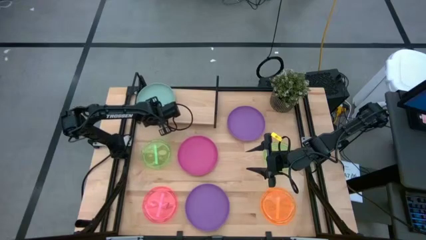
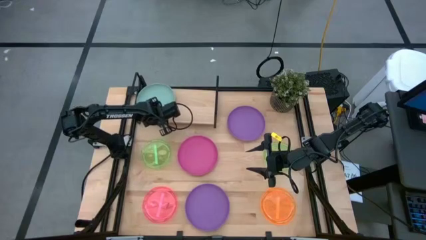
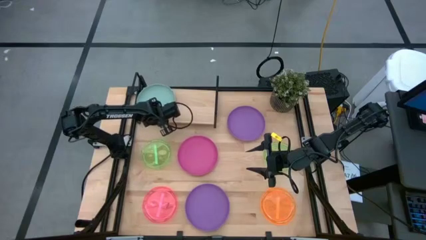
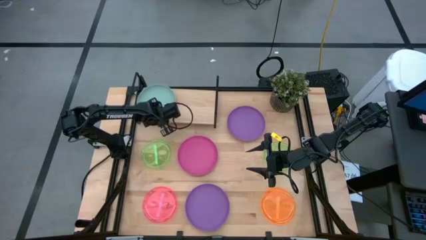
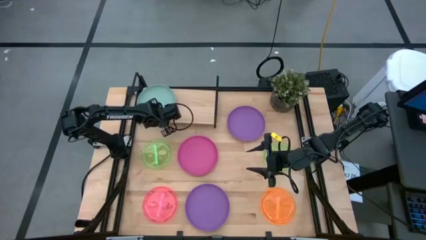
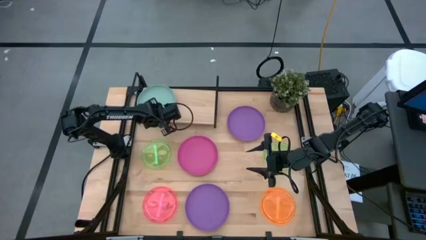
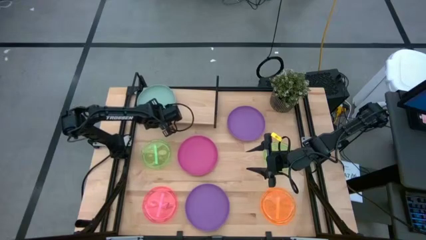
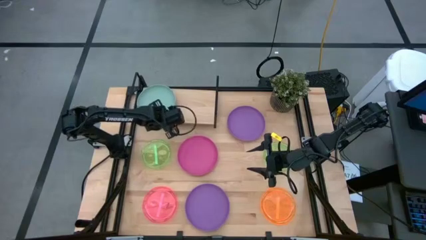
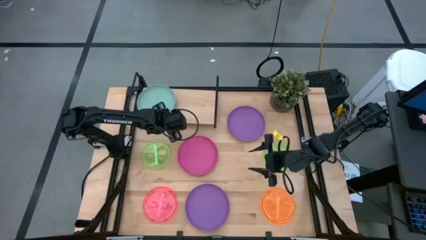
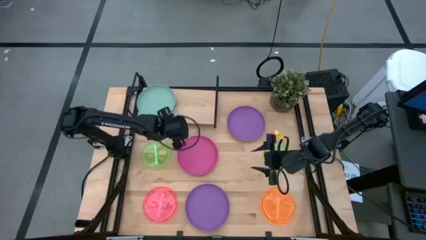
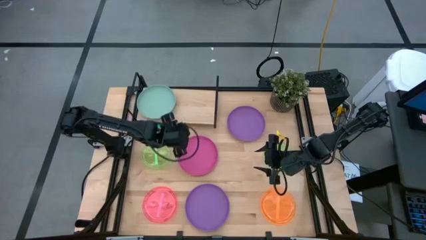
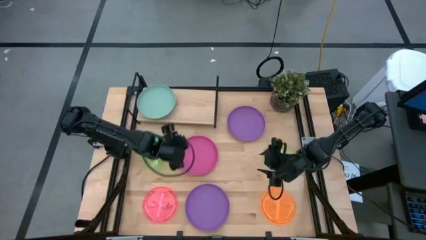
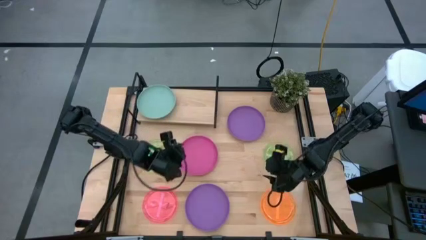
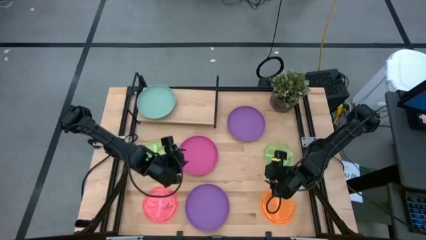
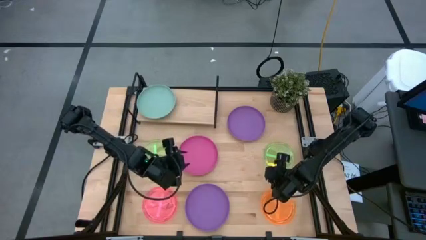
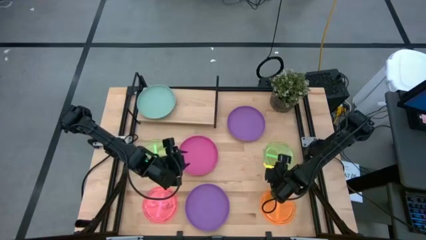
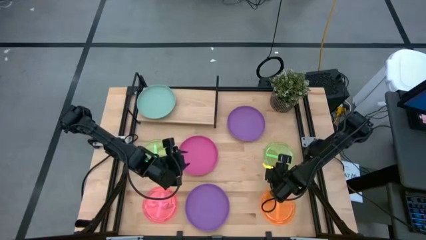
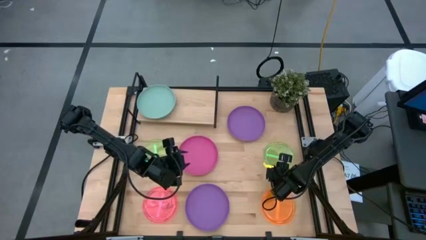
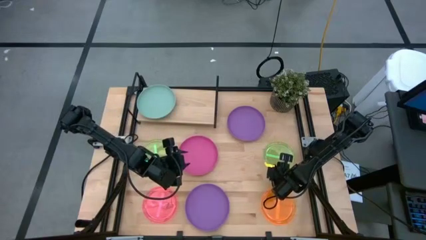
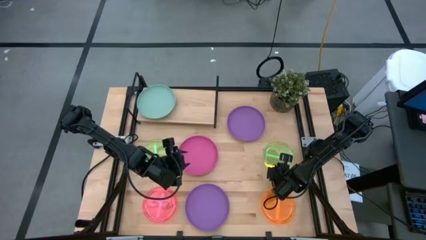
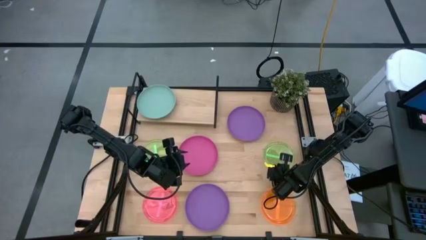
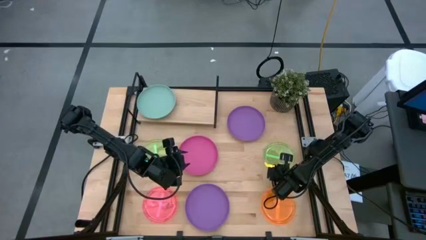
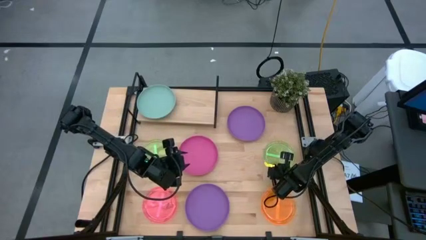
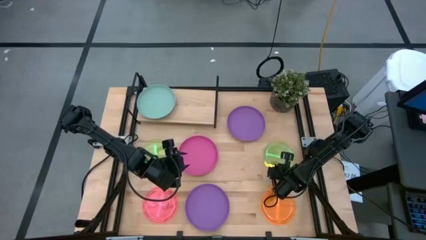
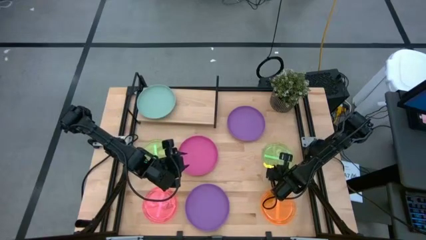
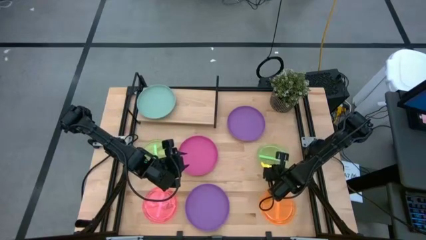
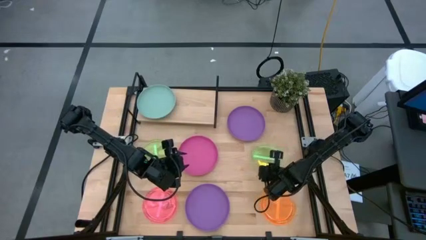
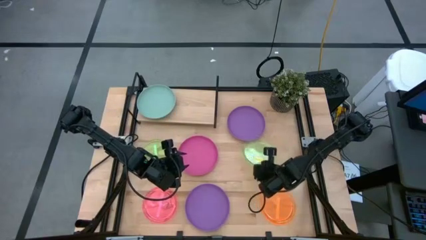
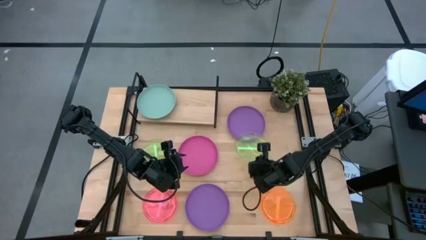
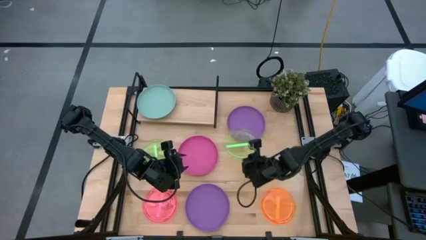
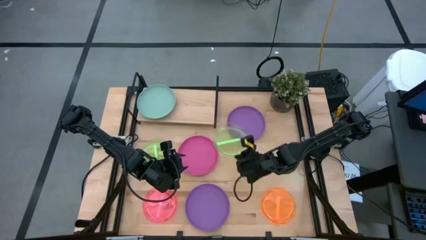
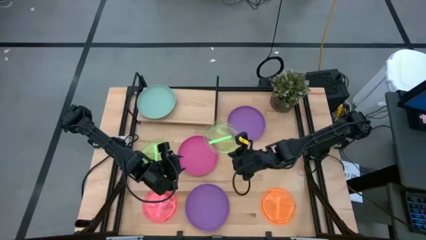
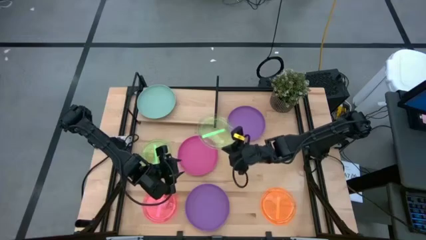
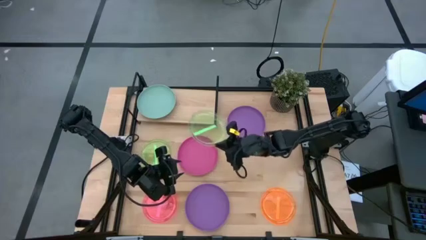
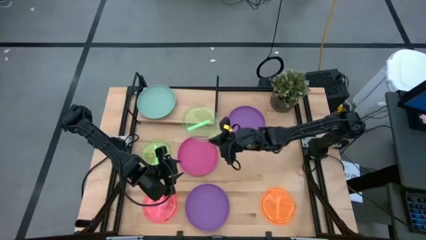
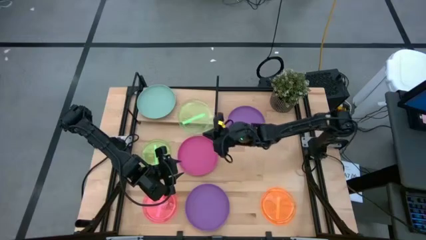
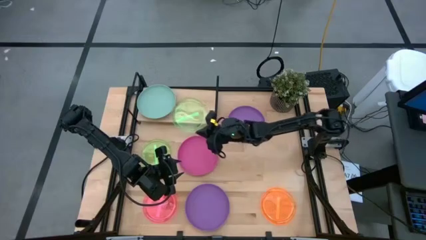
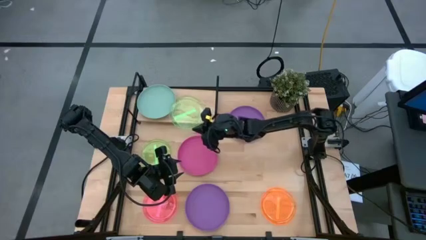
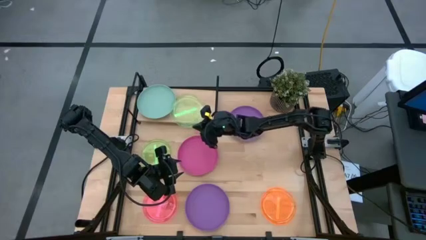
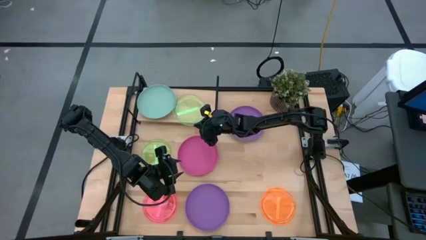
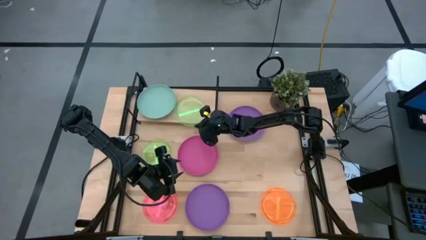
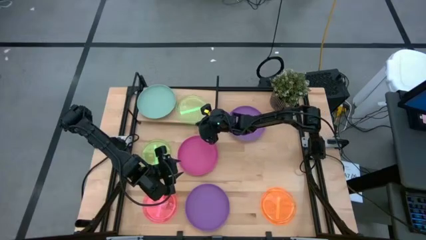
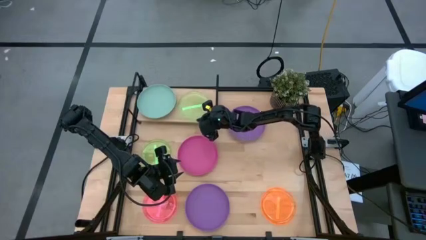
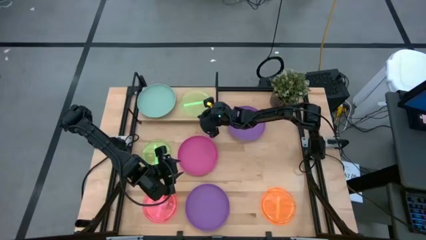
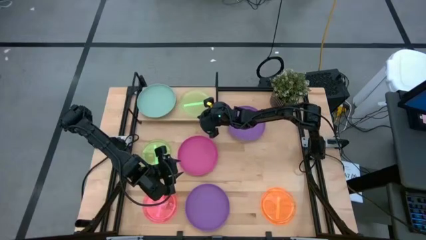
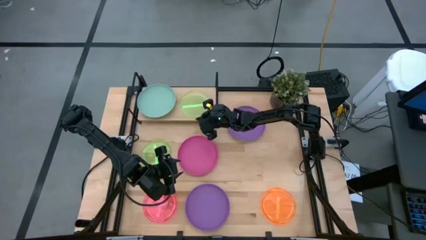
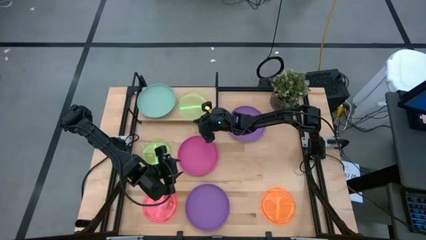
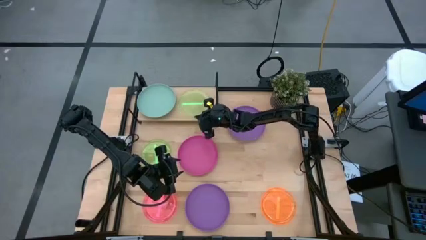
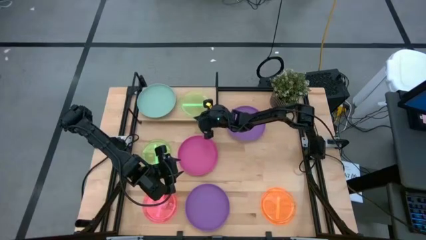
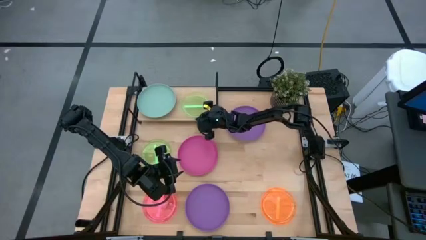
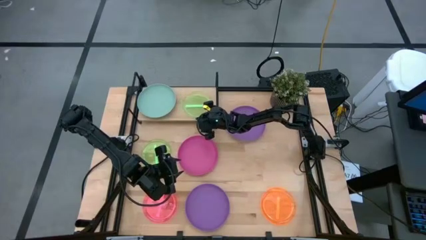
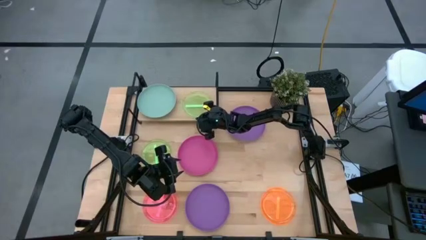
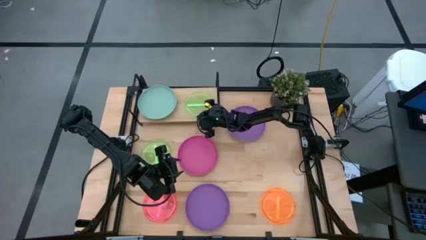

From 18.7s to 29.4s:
Task: Place and stack plates onto a shelf
Put the right green transparent plate on the shelf

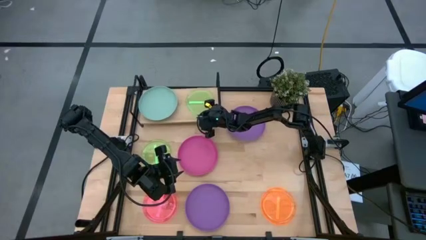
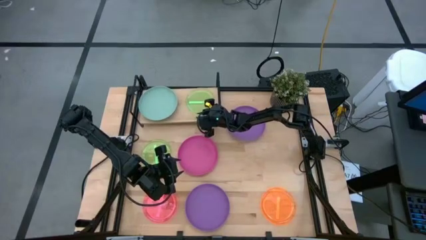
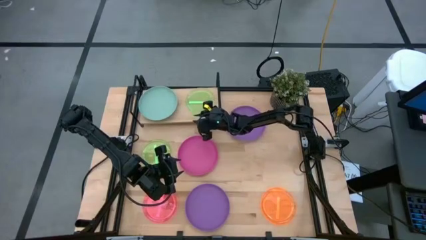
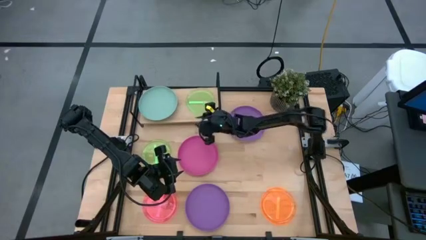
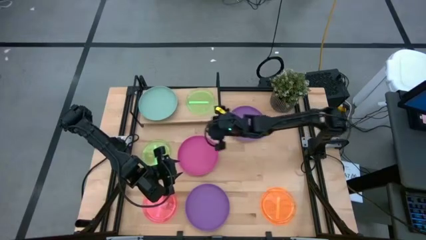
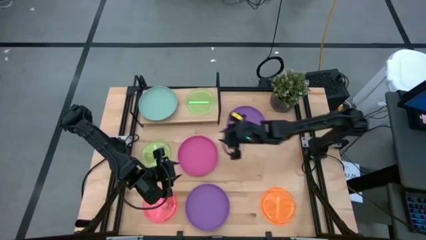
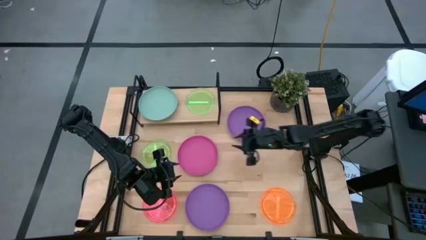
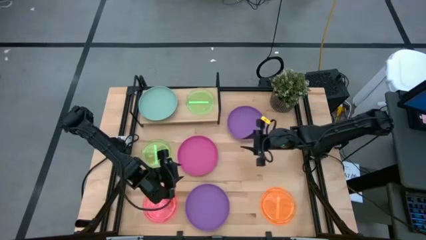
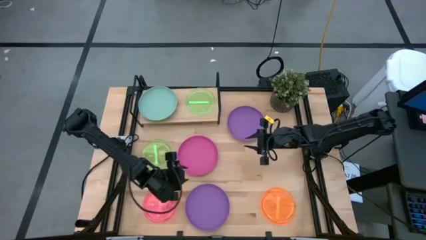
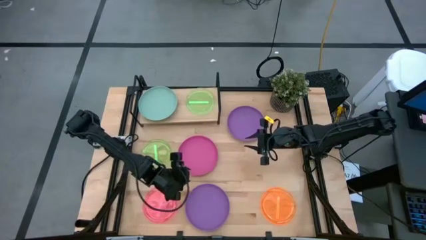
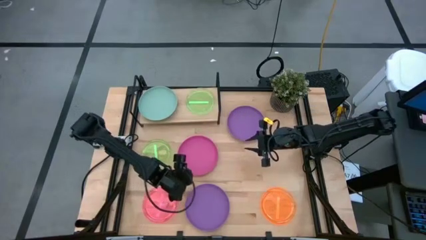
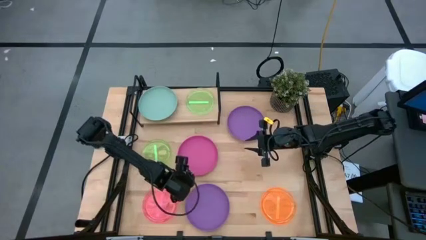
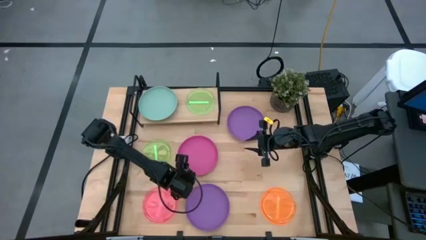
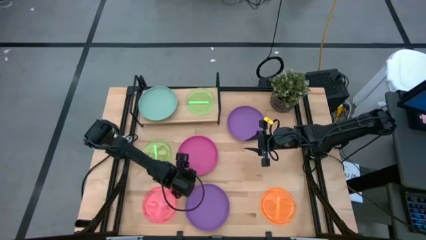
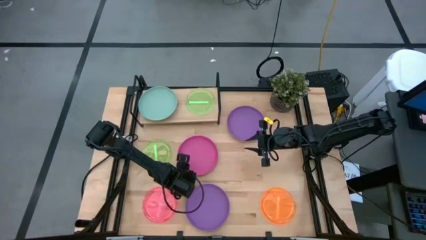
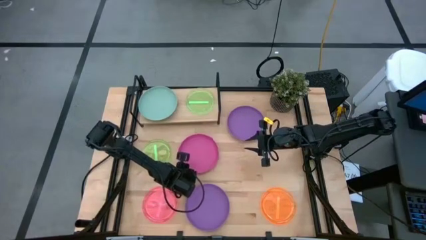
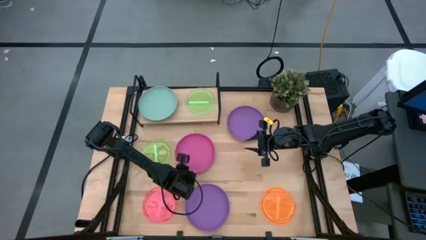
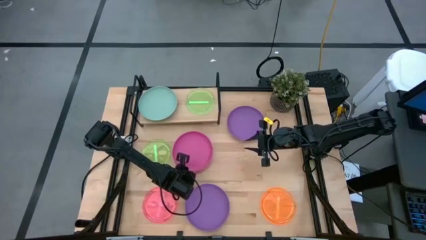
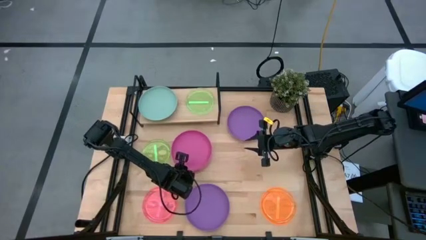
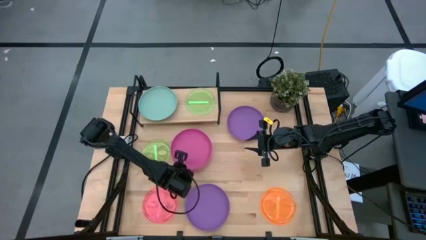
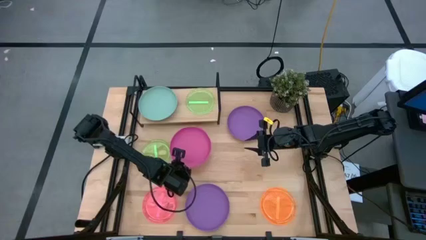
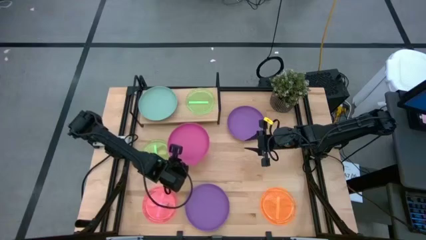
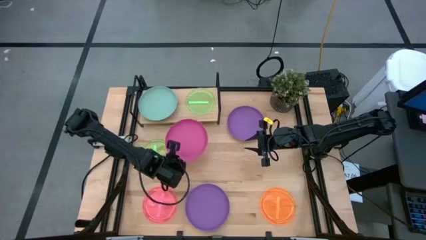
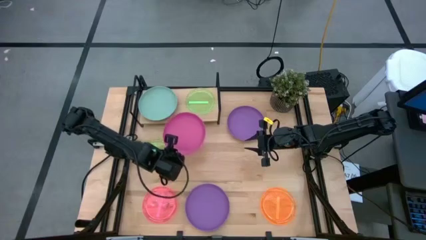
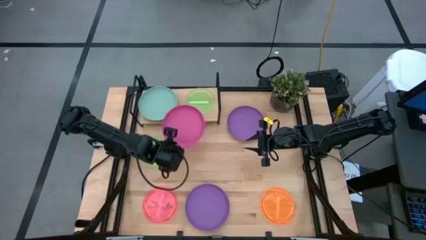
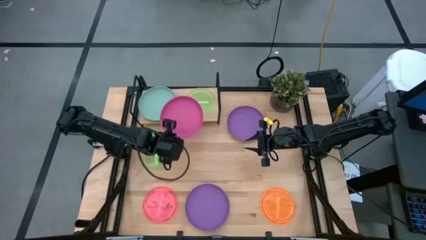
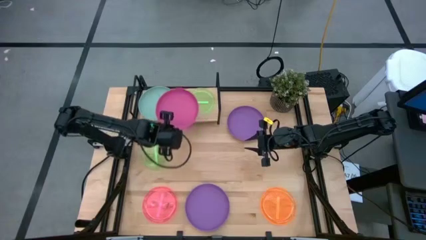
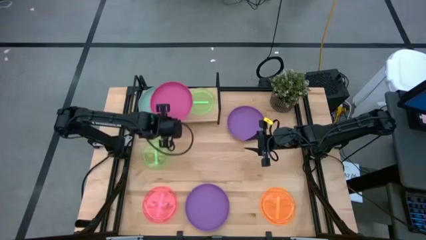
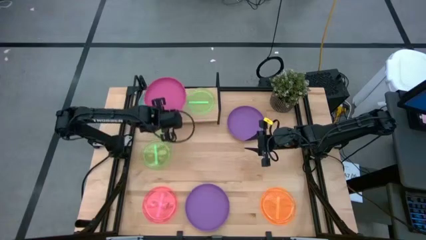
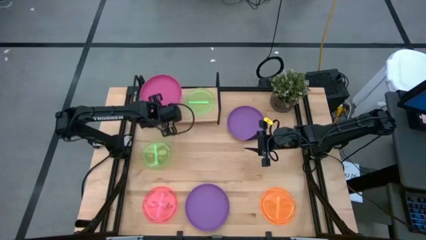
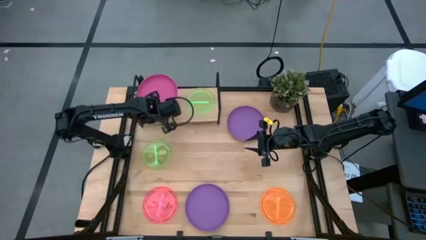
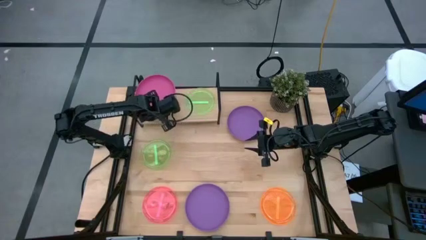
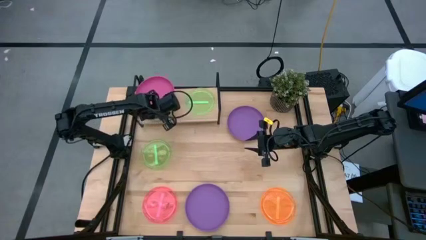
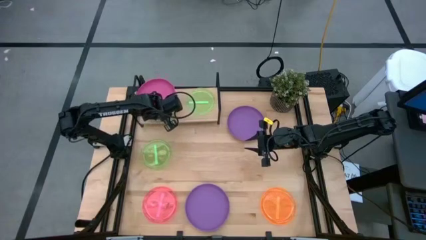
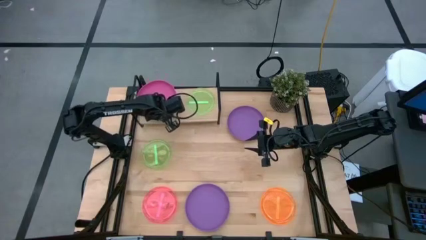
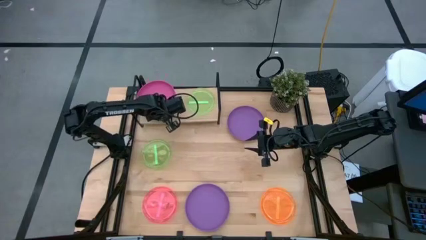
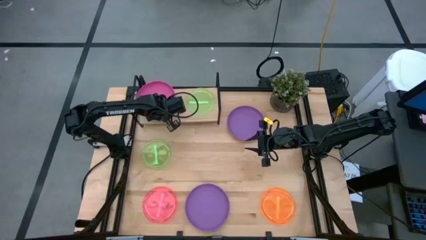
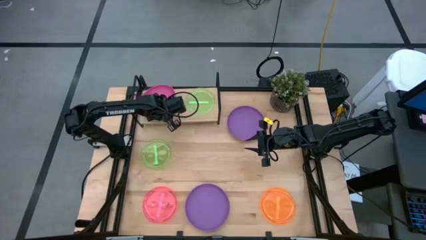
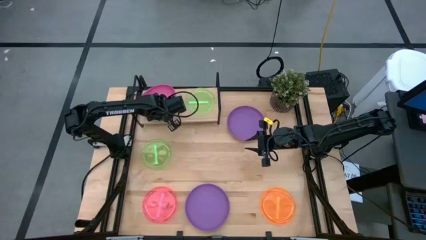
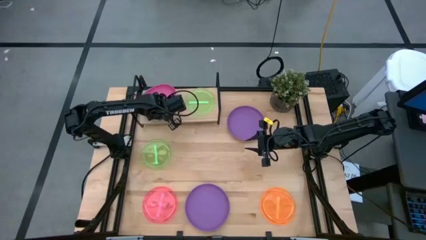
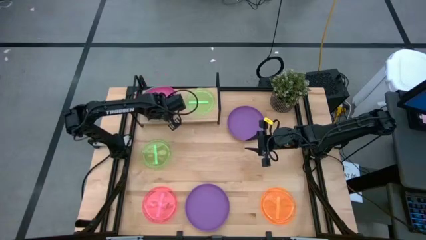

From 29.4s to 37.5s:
Stack the top pink plate into the blue plate on the shelf
